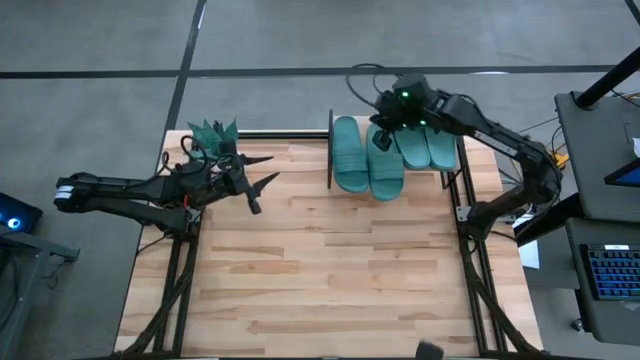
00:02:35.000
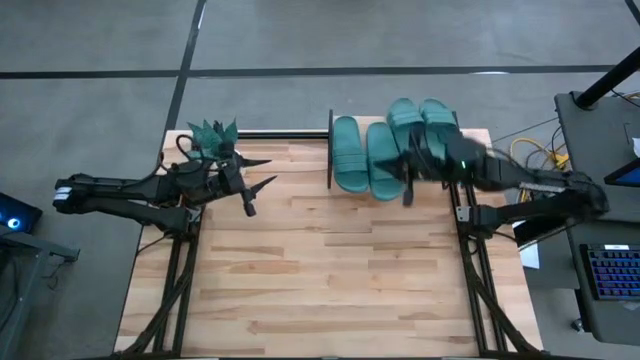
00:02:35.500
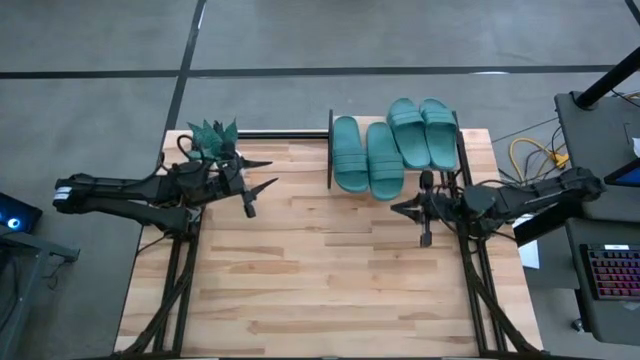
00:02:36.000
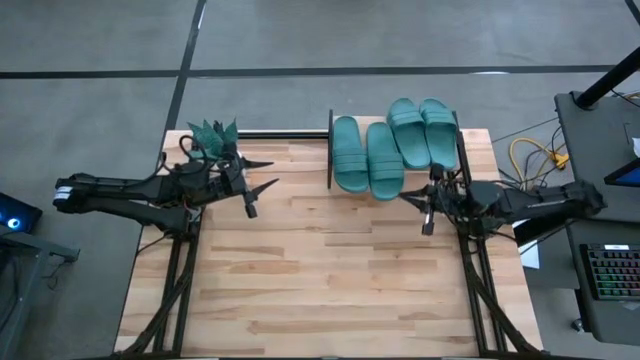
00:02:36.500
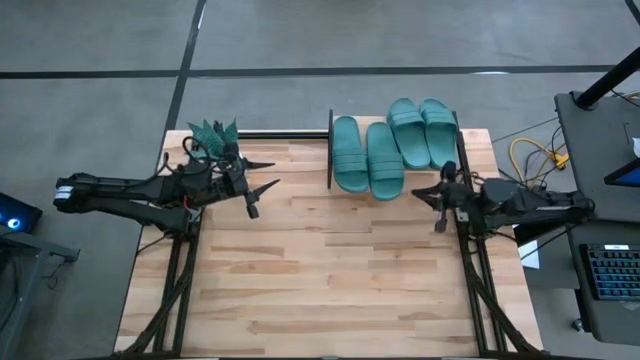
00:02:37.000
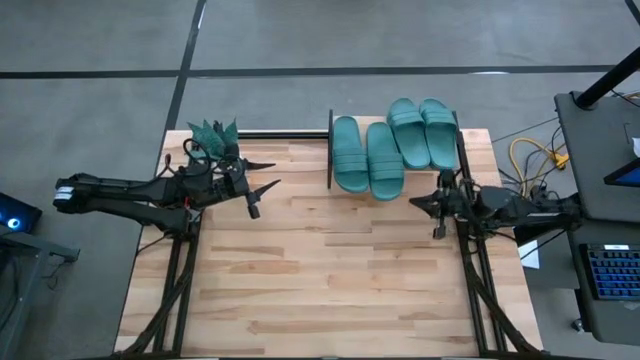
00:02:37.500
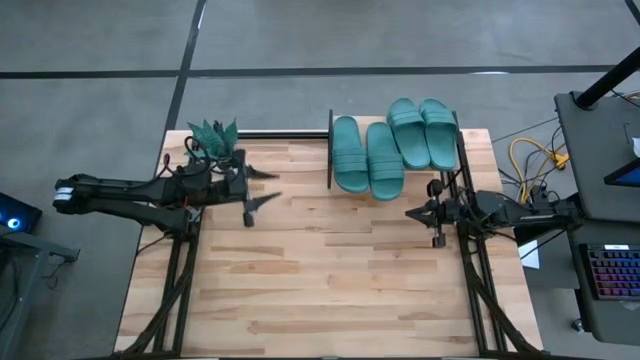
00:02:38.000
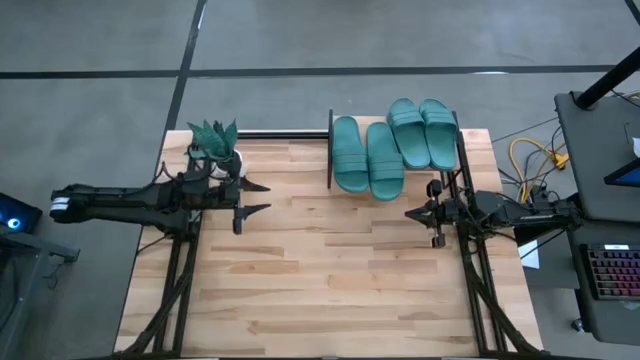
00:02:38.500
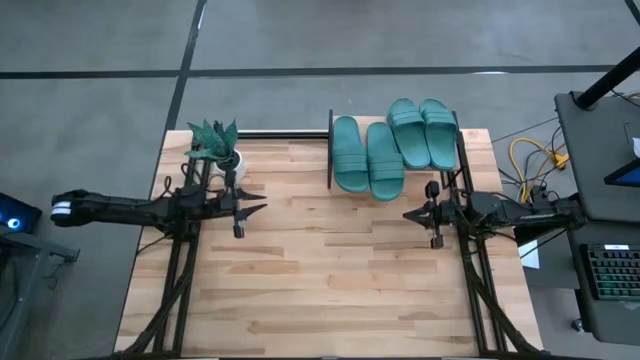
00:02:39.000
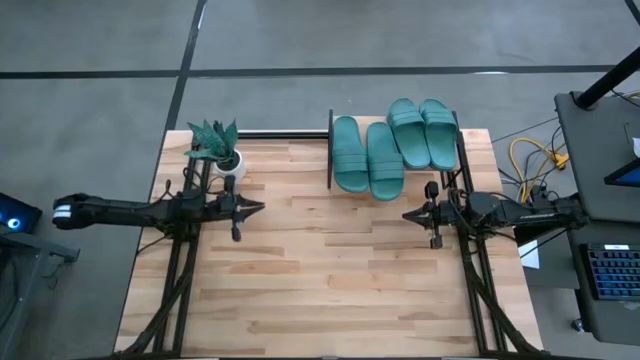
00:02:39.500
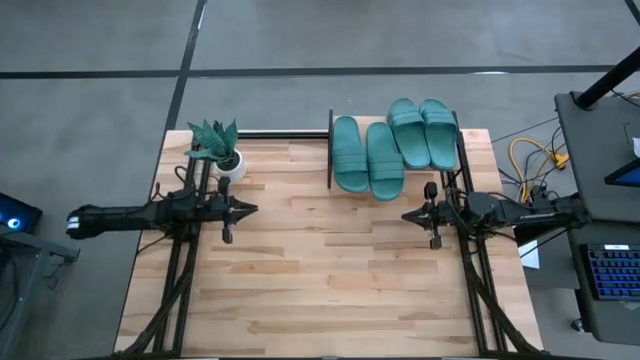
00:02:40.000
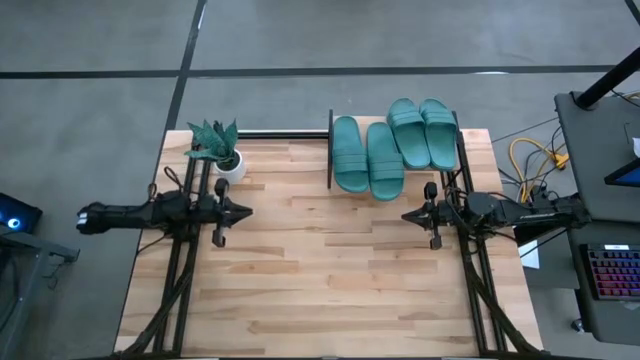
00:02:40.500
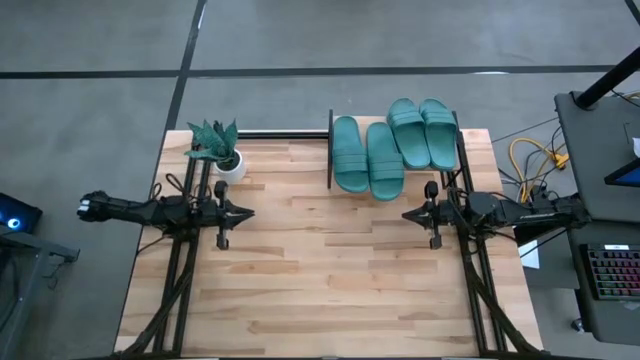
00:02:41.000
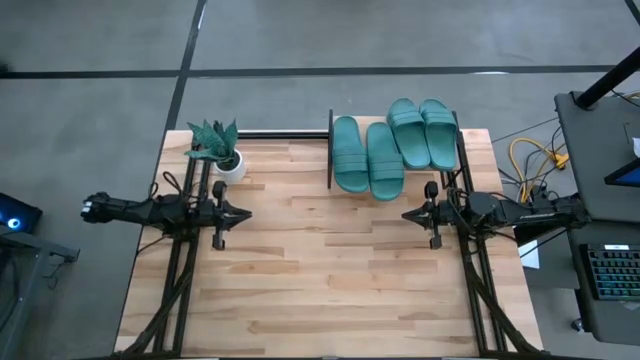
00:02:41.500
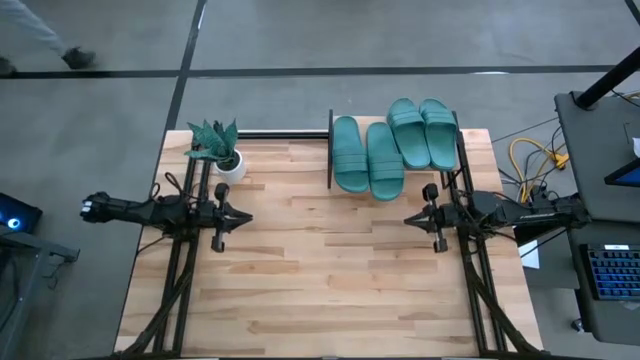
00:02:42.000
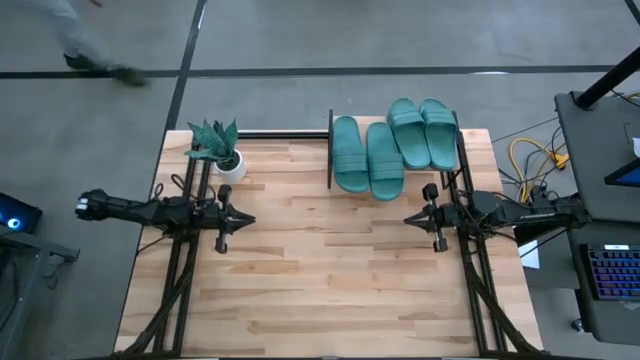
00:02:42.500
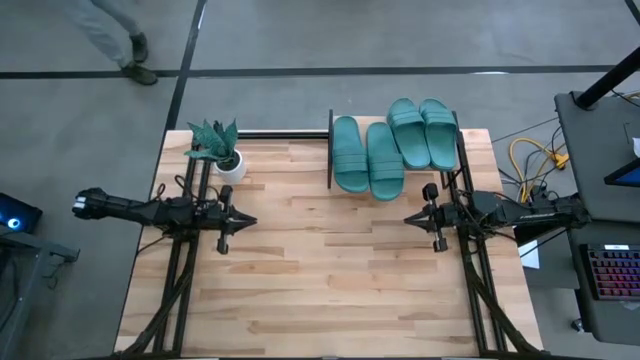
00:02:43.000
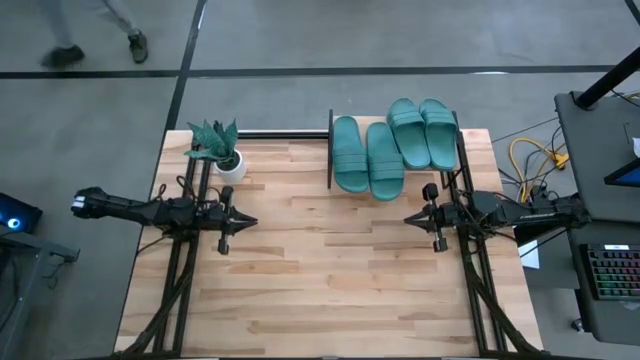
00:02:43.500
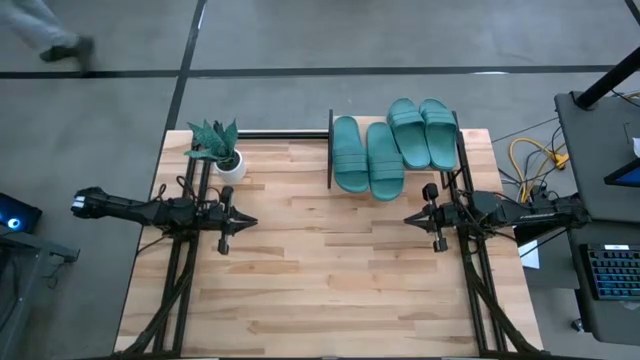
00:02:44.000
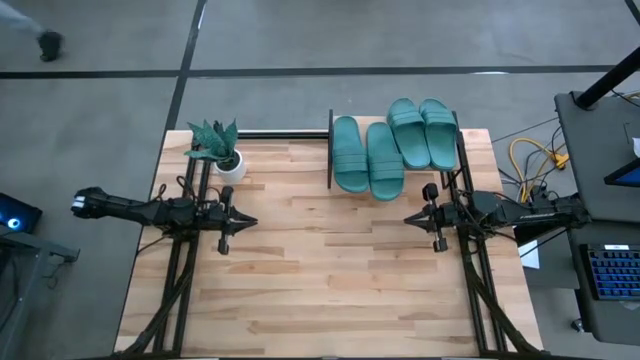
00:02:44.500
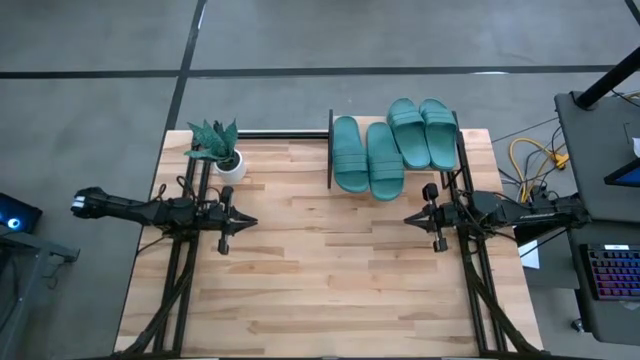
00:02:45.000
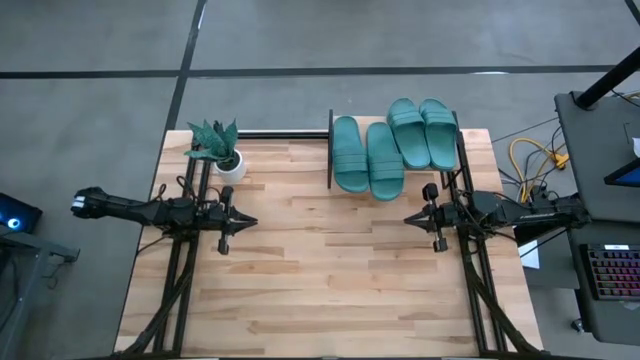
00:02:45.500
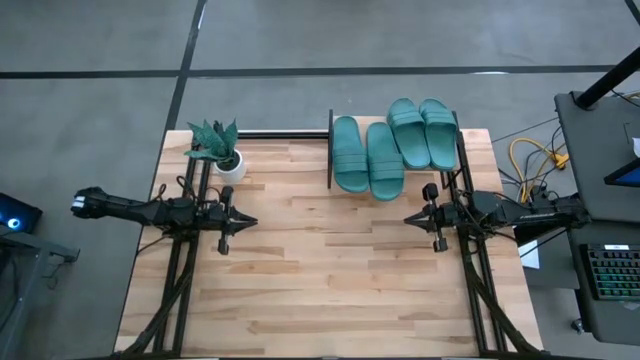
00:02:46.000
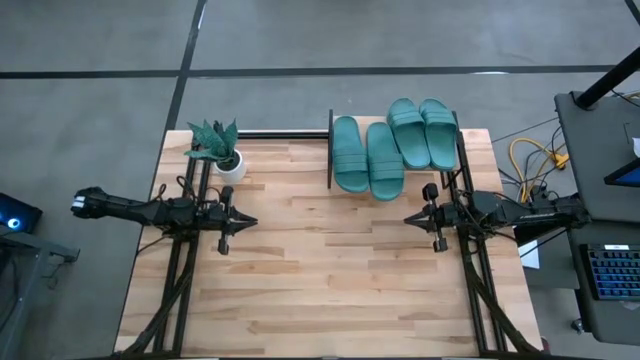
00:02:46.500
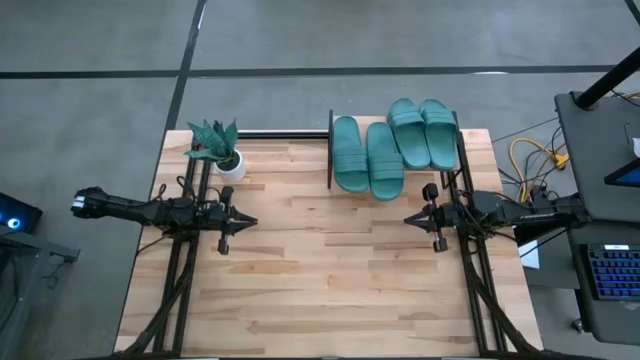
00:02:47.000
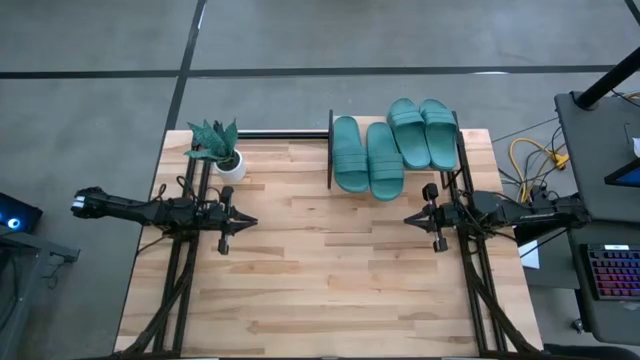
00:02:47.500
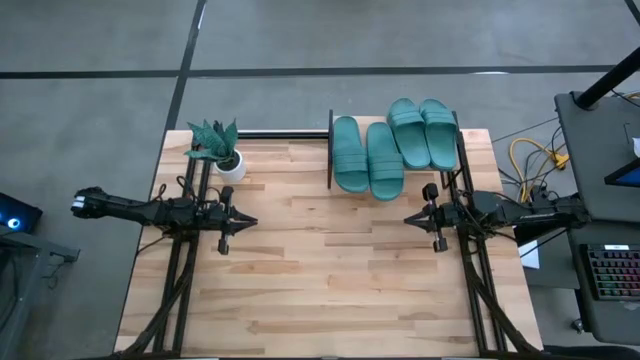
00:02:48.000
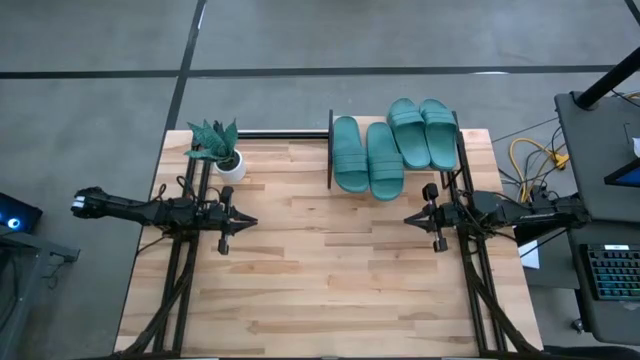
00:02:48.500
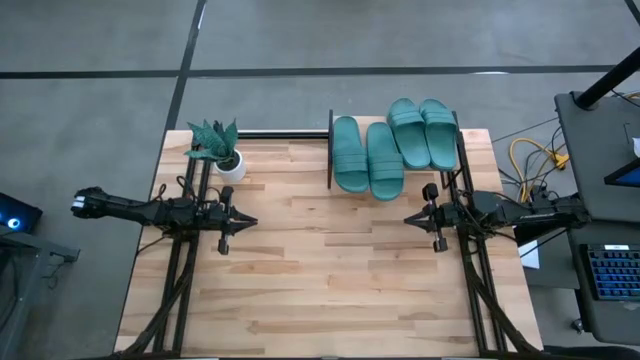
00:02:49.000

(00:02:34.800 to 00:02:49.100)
Task: Pick and place slides into the shelf
Return to Home Position

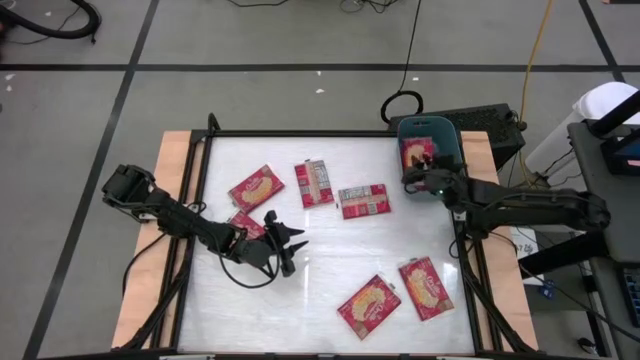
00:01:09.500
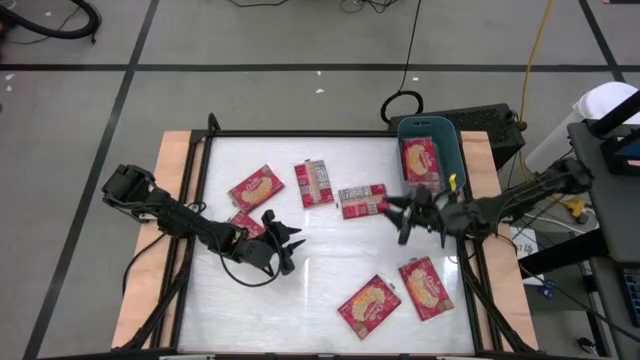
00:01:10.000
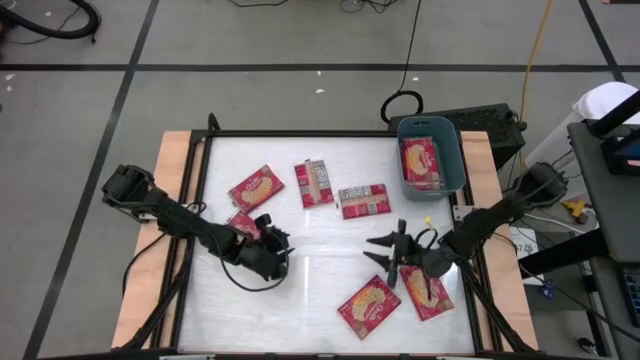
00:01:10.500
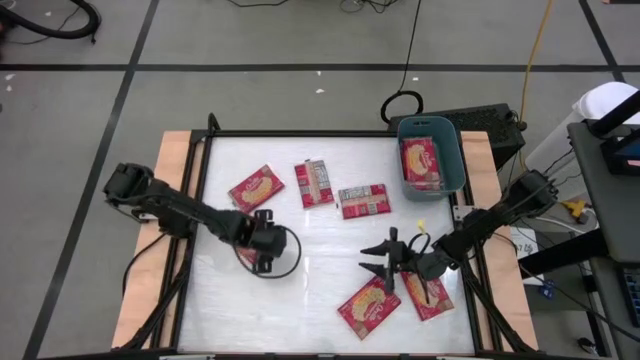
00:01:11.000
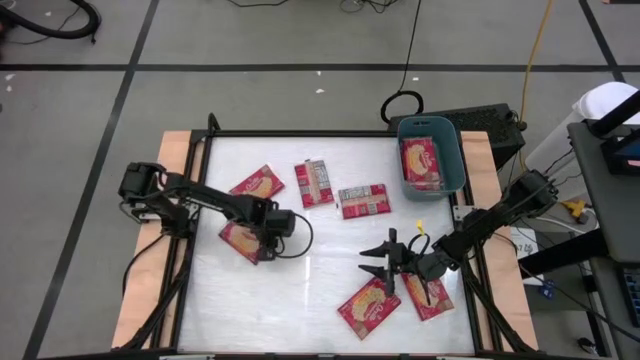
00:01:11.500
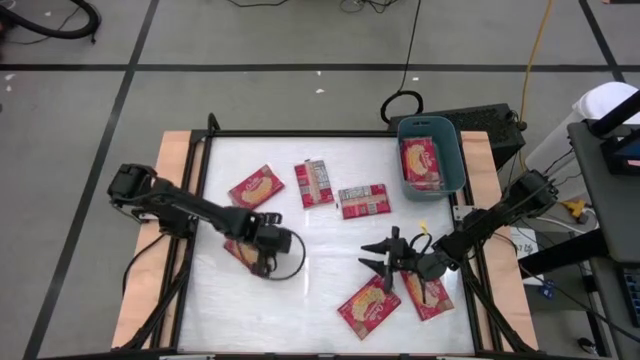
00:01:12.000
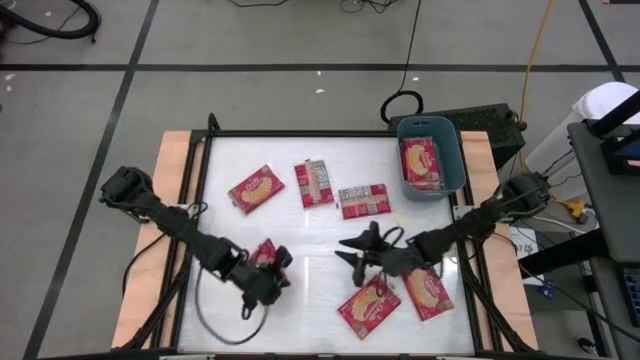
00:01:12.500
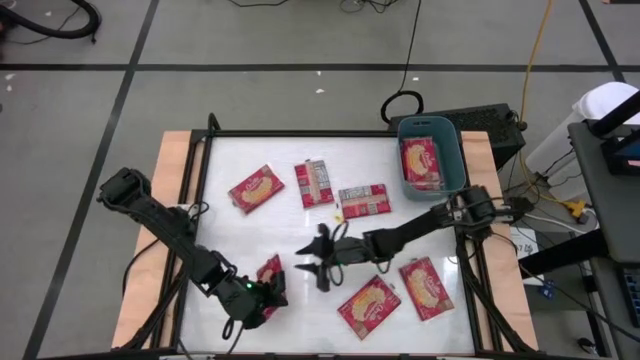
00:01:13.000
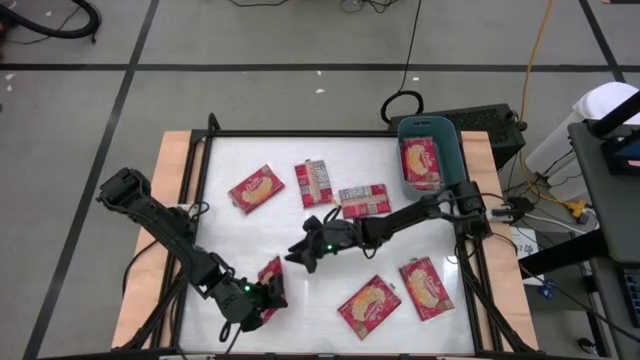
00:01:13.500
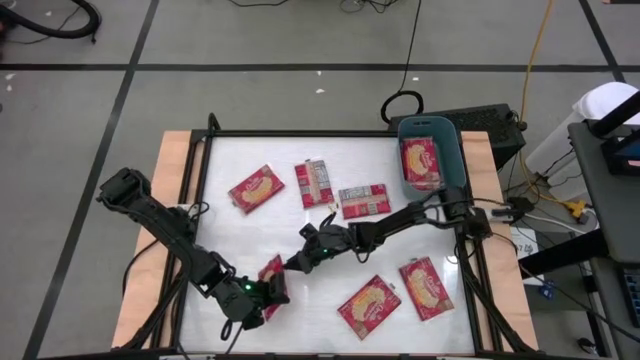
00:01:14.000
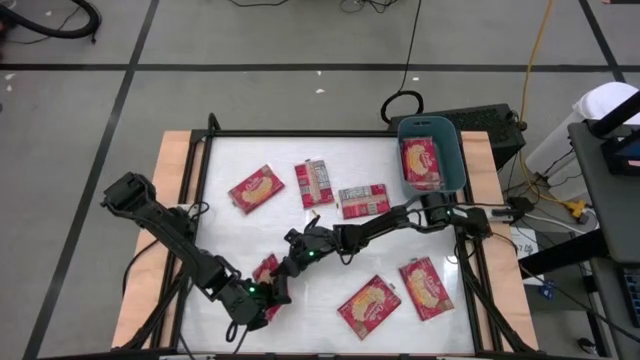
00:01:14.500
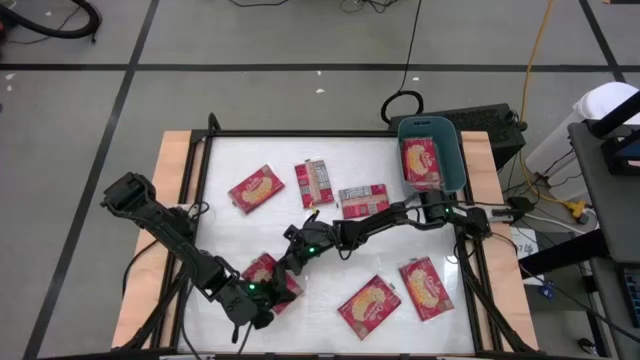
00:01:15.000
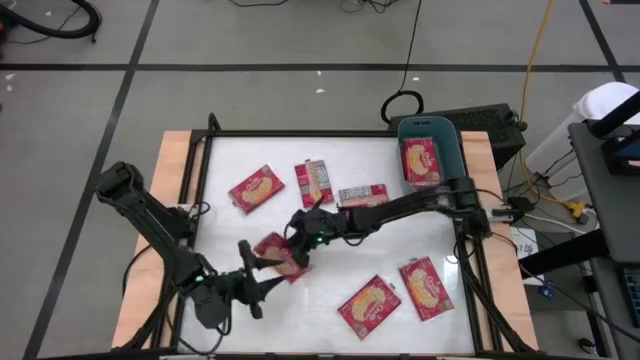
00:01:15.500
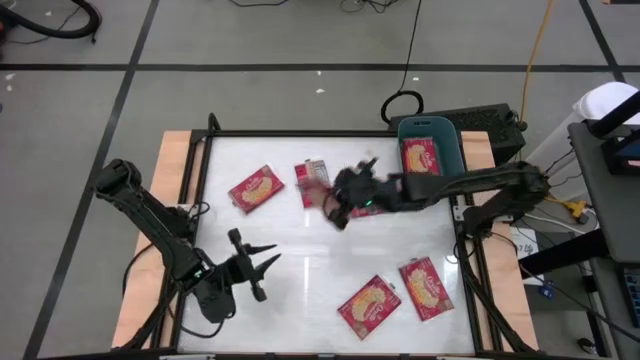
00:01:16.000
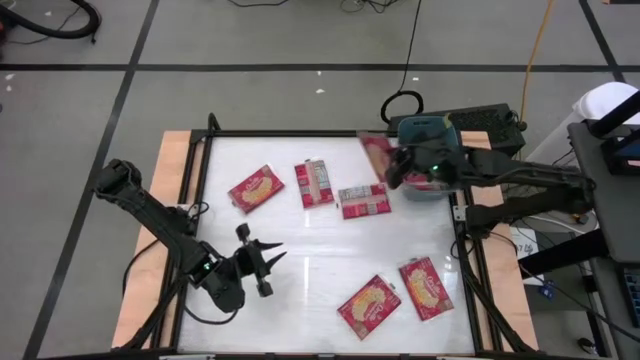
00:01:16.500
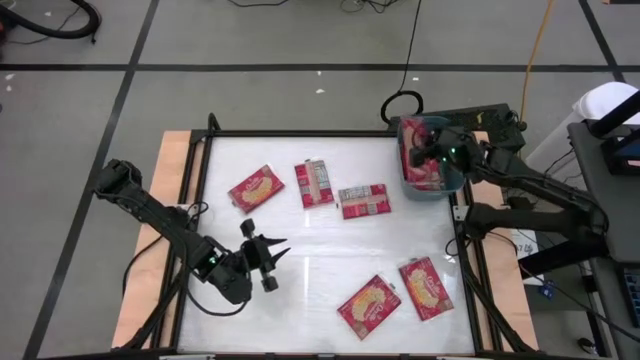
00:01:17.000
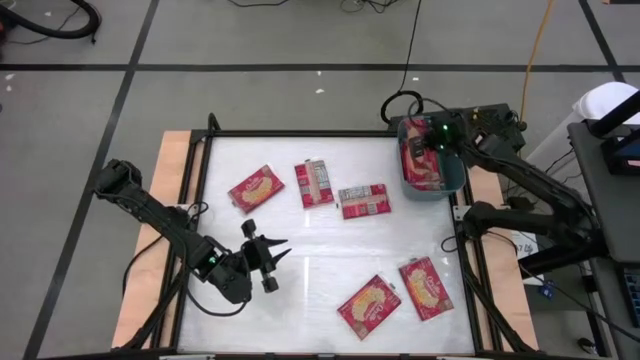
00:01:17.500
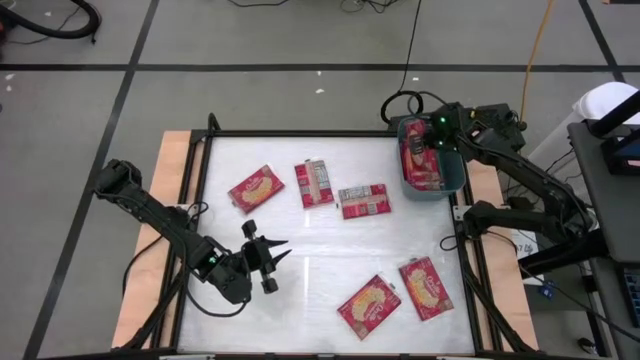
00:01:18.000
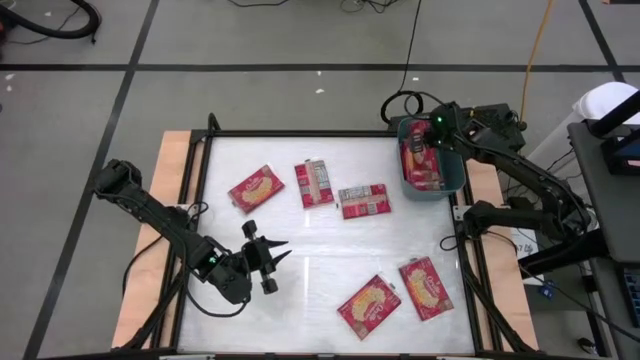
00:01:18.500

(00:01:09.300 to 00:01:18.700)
Task: Sort popcorn bags into baskets
Put the red popcorn bag into the blue bin
